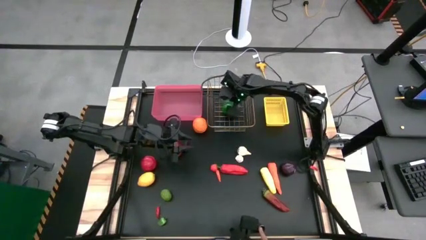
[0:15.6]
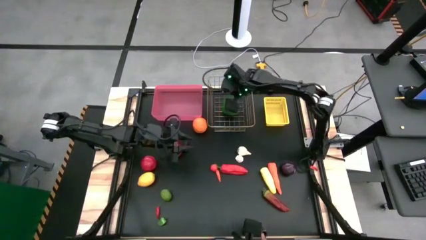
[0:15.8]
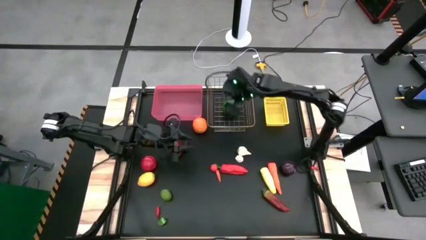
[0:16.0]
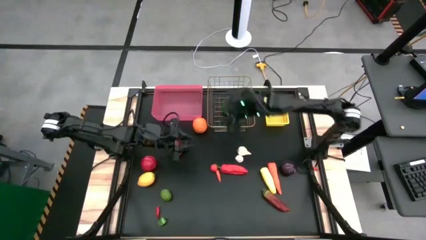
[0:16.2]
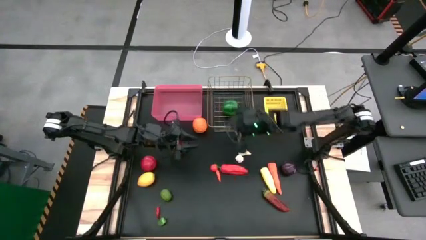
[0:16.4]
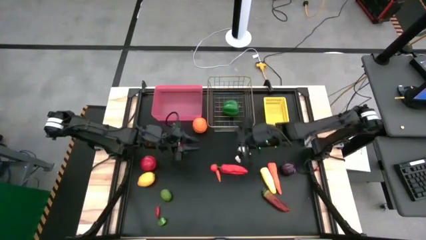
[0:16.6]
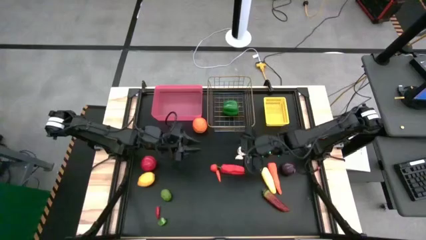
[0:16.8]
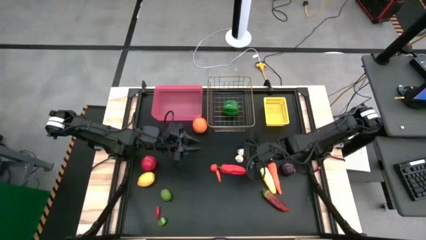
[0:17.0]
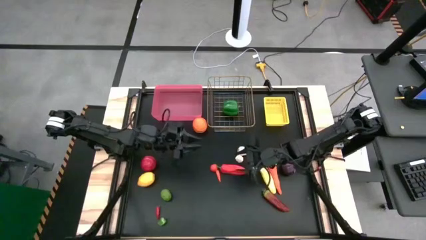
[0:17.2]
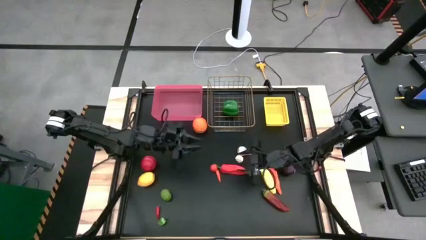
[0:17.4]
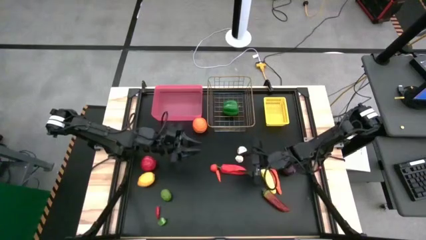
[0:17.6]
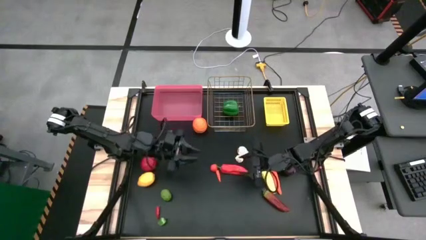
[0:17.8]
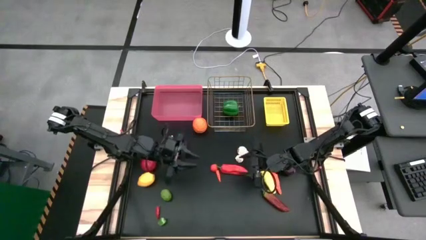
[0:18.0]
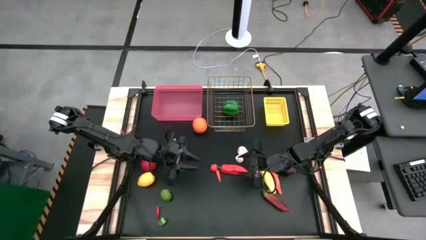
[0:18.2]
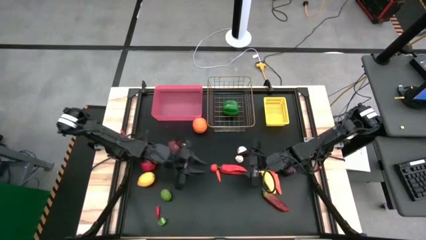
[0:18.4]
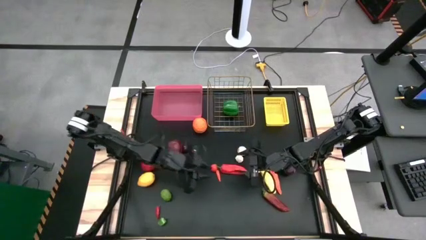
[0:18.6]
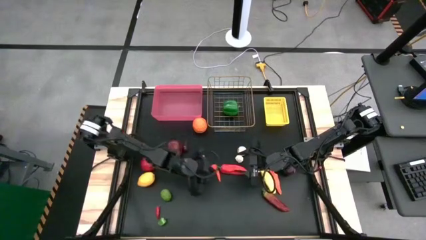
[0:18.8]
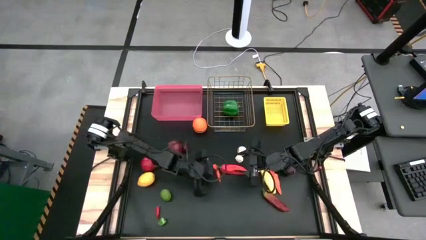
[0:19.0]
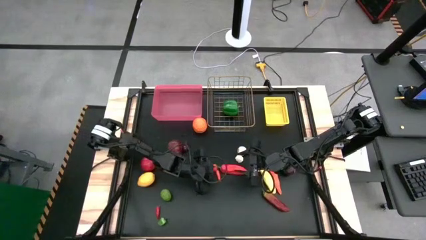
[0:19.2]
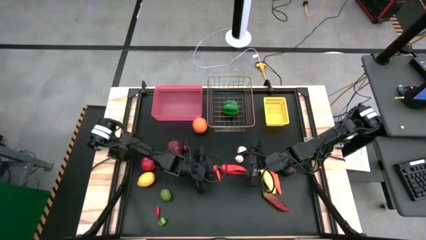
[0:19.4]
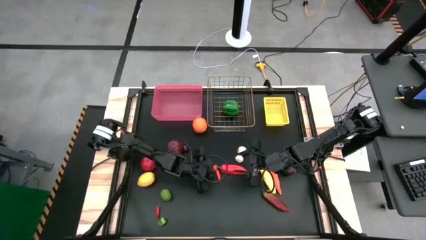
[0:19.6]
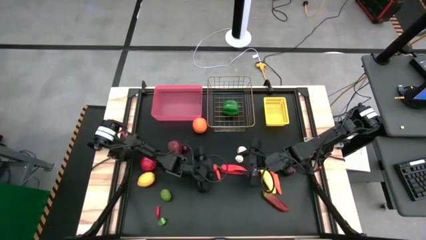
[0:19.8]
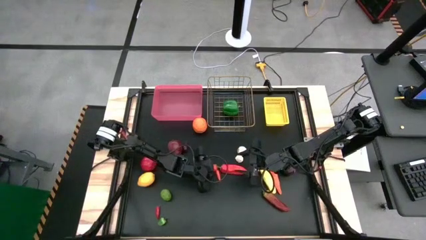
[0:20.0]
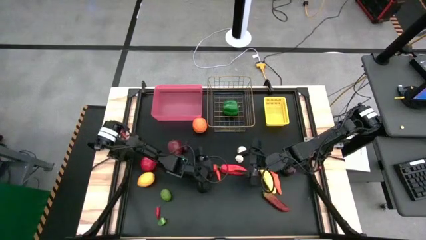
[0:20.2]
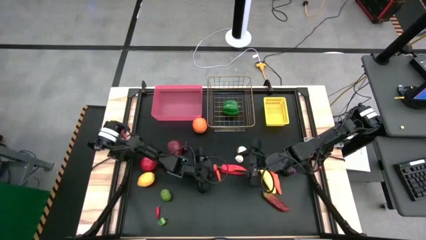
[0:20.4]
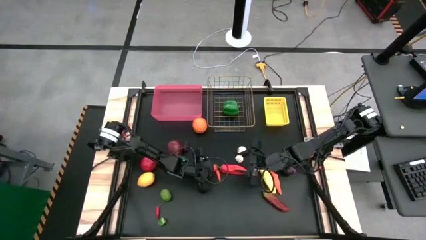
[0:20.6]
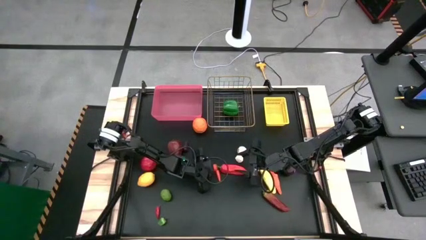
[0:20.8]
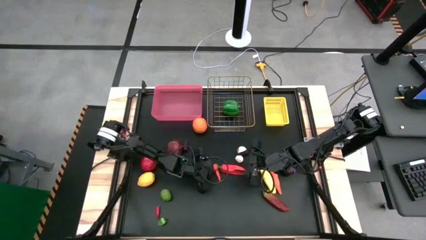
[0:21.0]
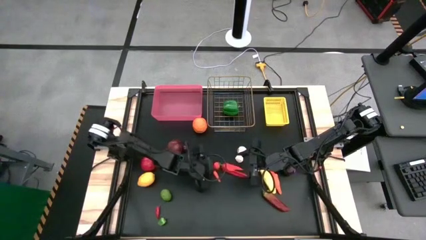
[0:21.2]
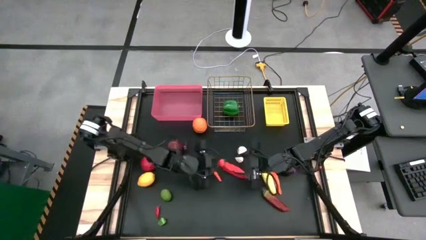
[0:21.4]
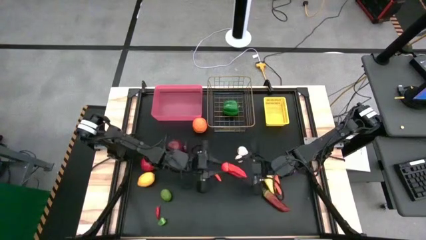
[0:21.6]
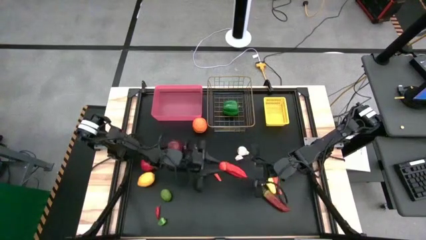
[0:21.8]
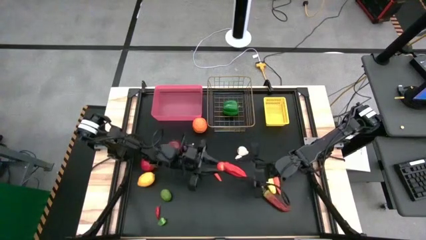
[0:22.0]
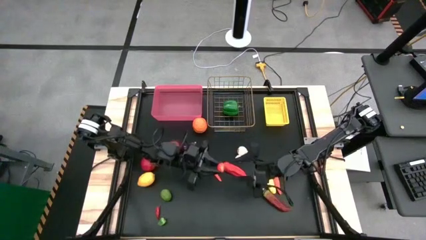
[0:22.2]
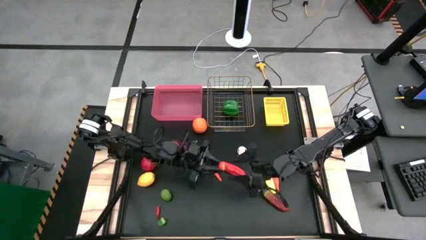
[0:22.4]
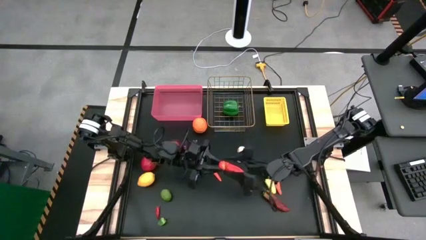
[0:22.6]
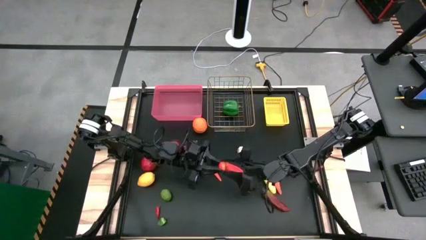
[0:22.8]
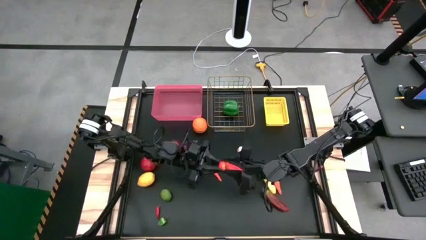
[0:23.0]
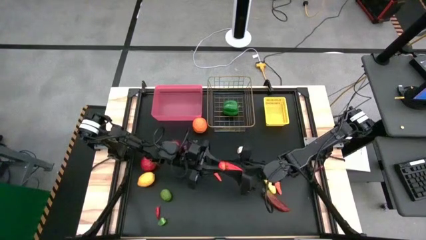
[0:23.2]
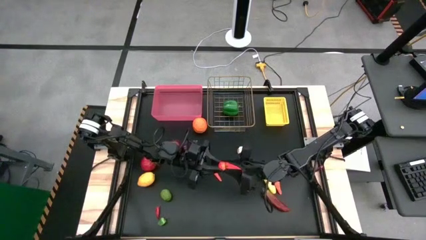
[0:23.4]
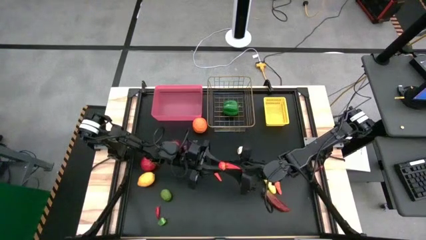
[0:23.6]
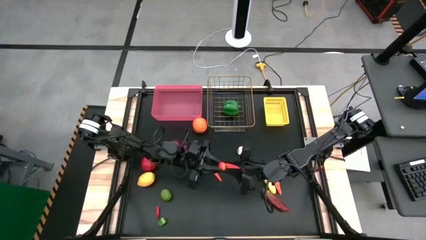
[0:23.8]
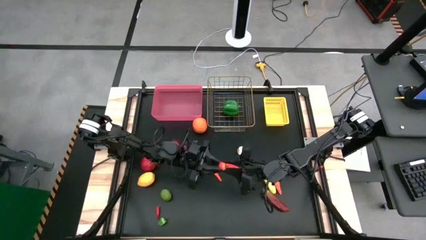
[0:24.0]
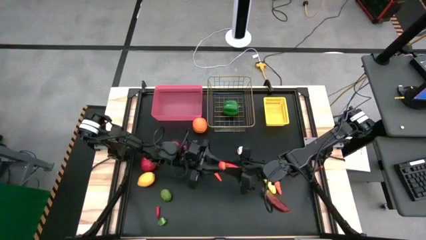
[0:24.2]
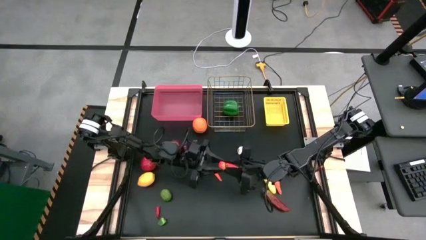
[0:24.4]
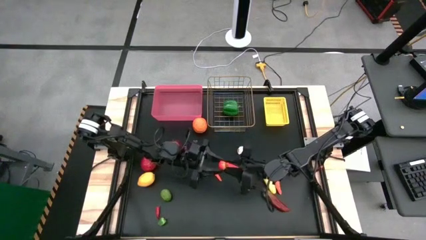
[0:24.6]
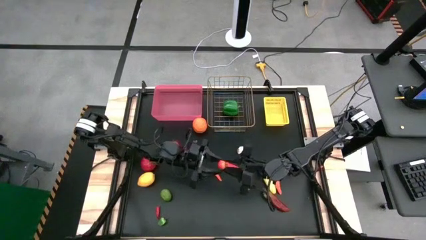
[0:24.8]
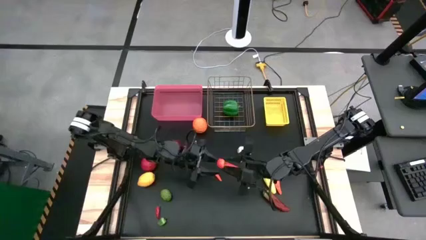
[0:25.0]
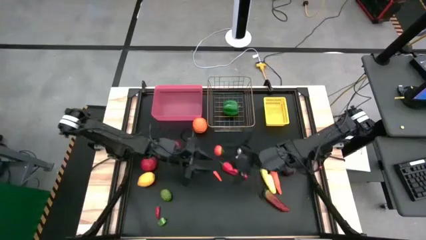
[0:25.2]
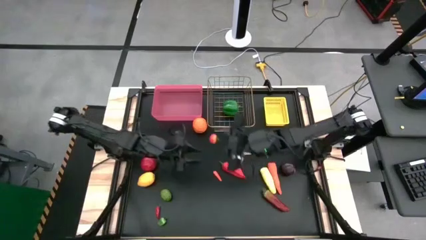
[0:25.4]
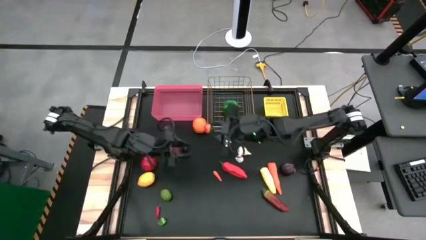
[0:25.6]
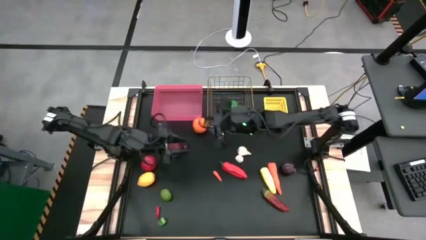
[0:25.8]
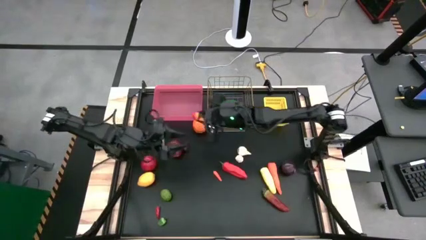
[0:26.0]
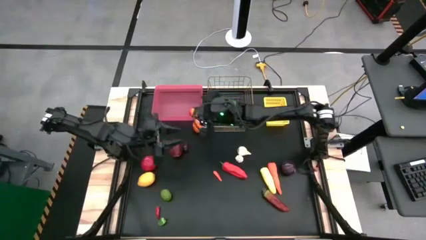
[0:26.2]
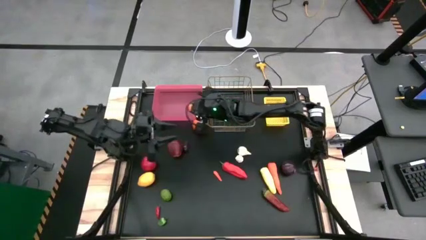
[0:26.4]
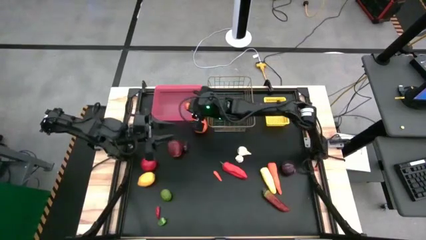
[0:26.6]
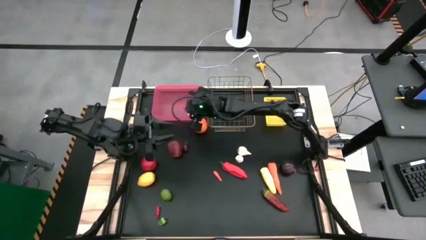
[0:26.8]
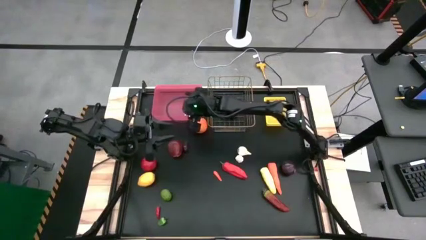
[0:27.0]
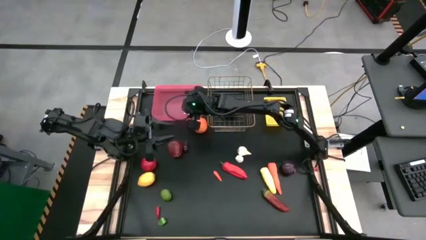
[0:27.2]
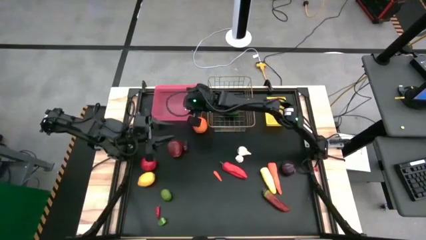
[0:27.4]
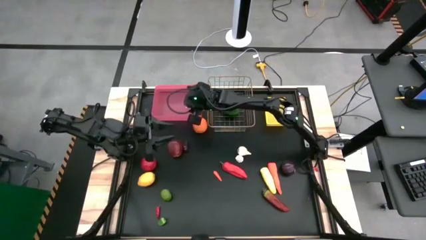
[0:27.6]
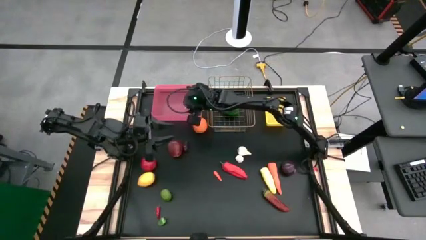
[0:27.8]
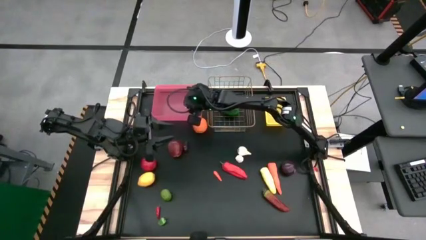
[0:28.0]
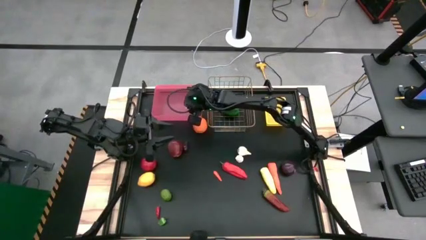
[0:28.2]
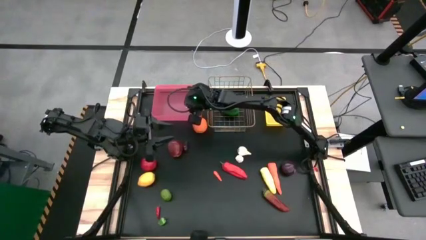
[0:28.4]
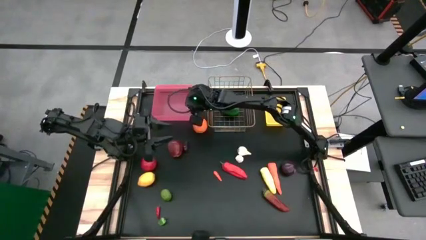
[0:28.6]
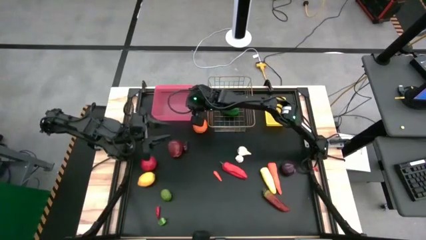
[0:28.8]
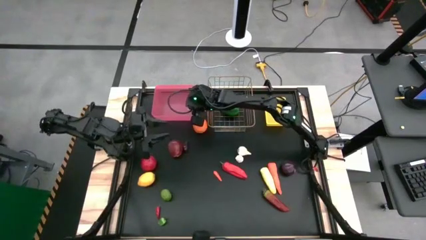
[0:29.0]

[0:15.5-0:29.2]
Task: Sort produce into baskets
Put the small red tomato into the red bin
